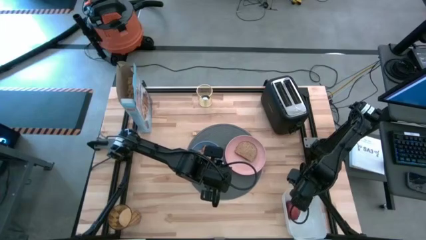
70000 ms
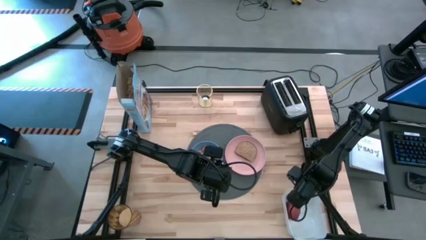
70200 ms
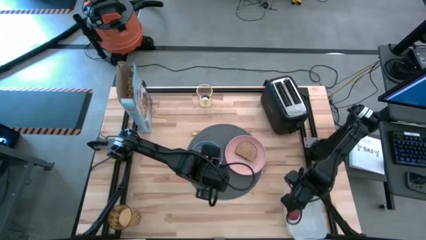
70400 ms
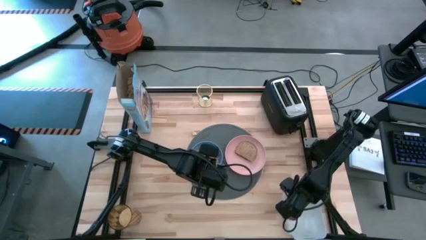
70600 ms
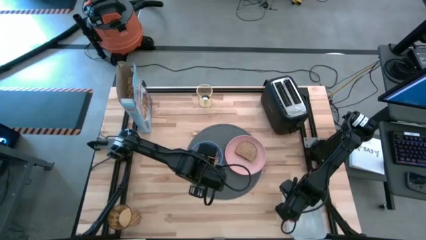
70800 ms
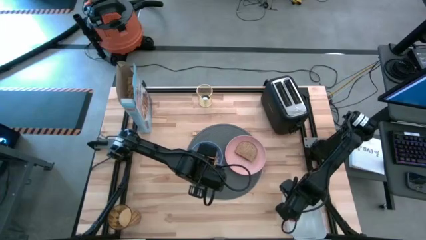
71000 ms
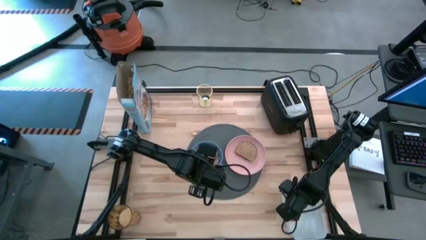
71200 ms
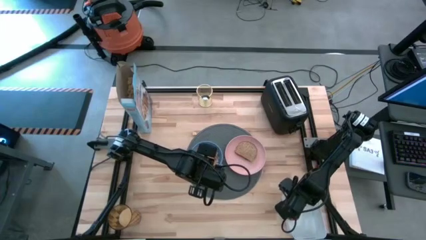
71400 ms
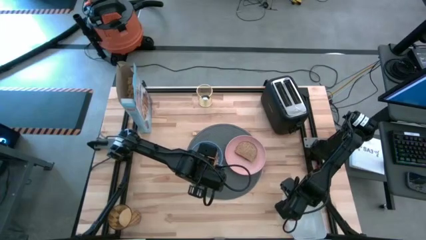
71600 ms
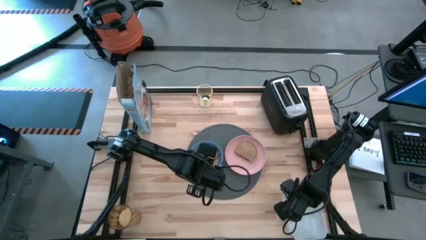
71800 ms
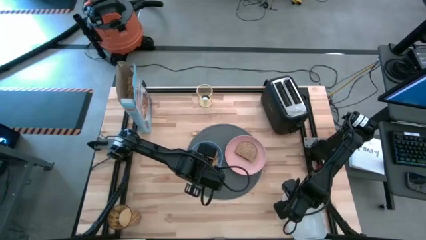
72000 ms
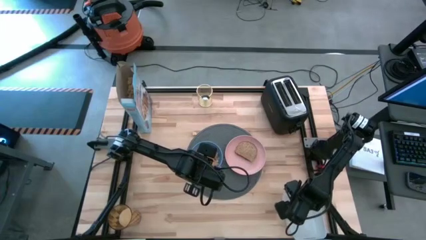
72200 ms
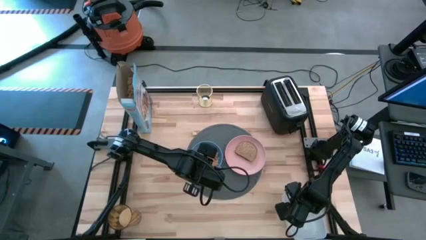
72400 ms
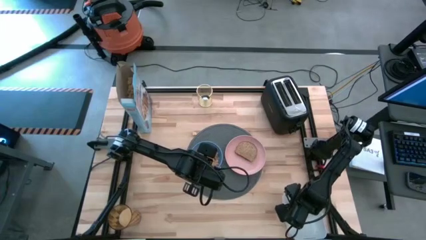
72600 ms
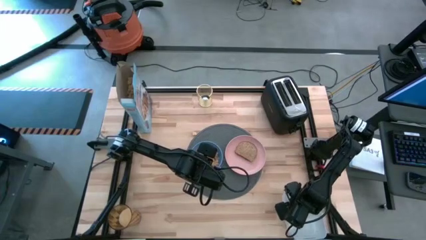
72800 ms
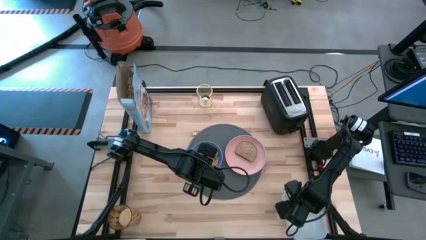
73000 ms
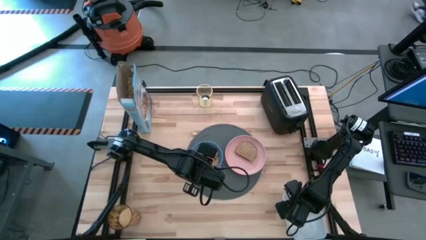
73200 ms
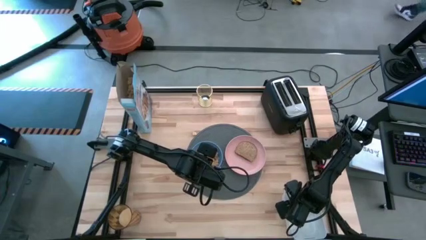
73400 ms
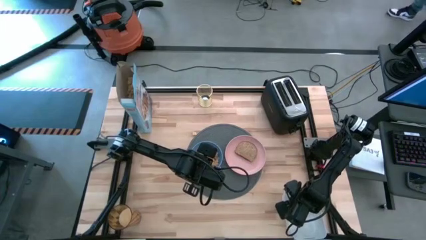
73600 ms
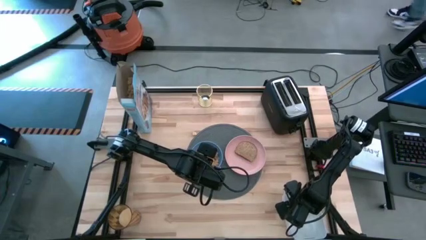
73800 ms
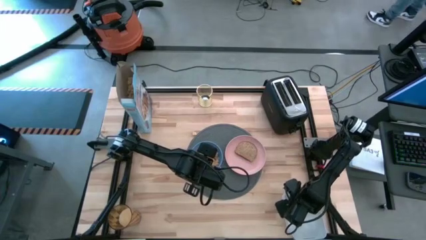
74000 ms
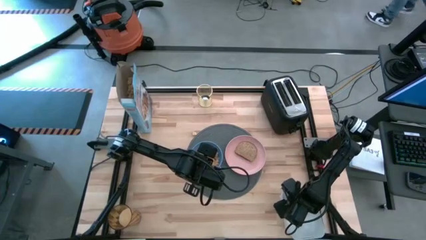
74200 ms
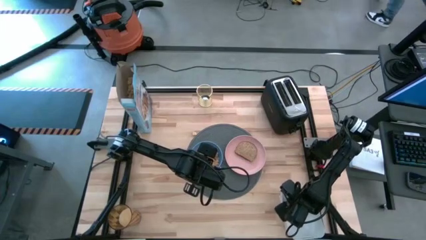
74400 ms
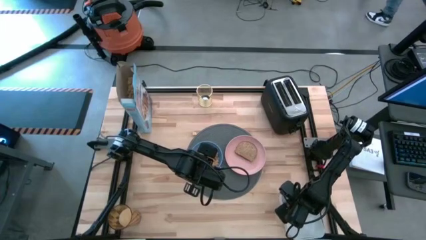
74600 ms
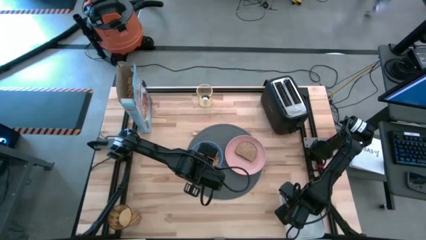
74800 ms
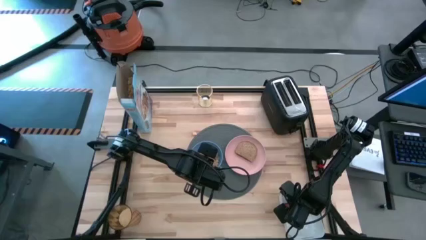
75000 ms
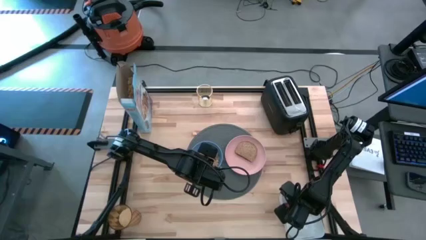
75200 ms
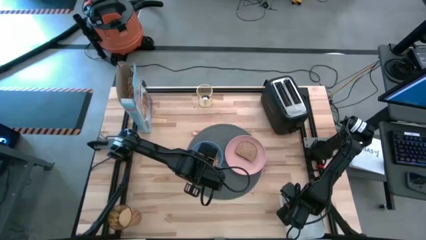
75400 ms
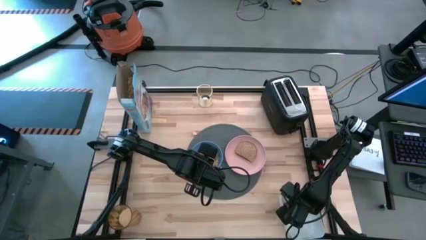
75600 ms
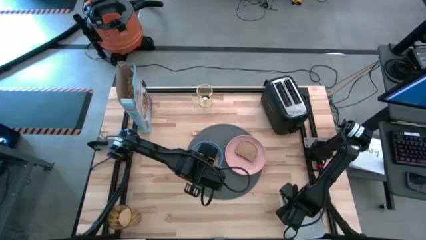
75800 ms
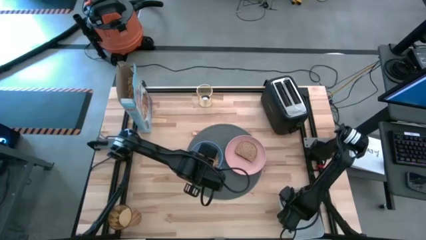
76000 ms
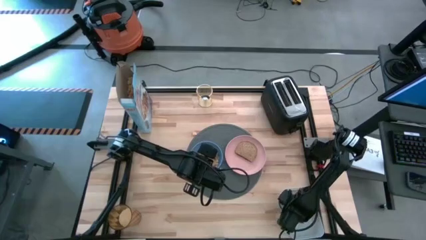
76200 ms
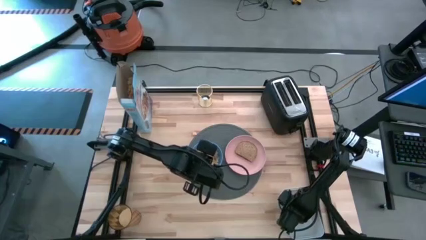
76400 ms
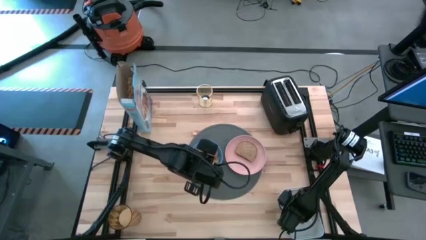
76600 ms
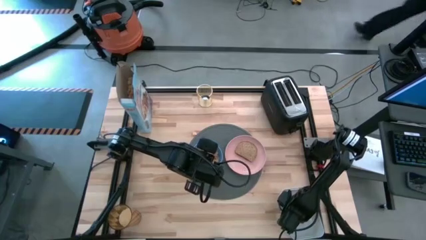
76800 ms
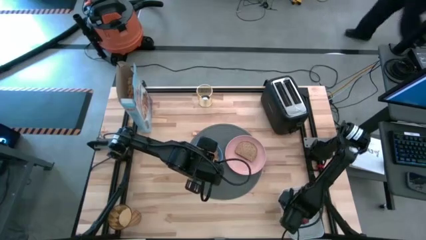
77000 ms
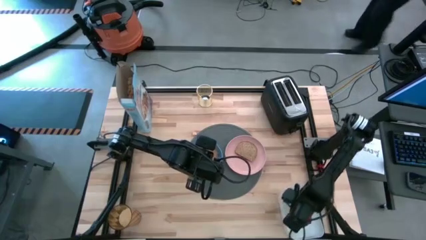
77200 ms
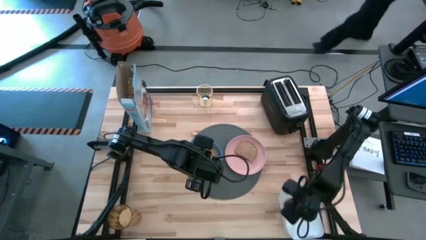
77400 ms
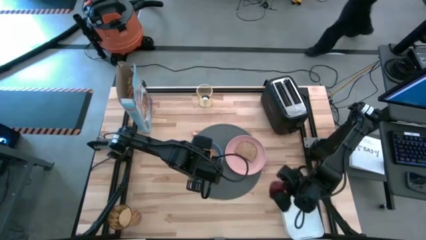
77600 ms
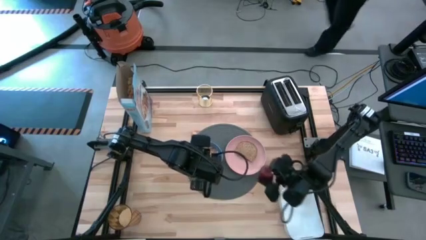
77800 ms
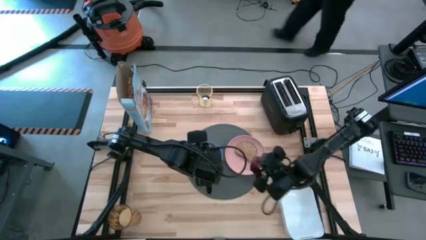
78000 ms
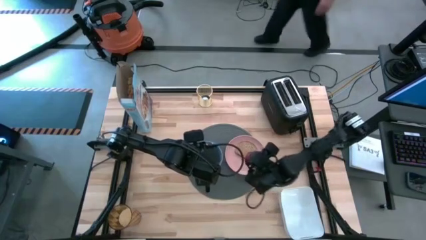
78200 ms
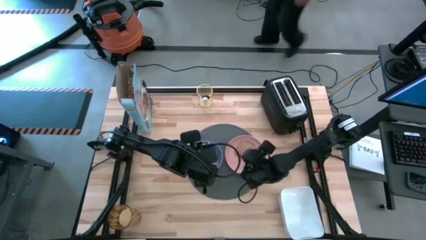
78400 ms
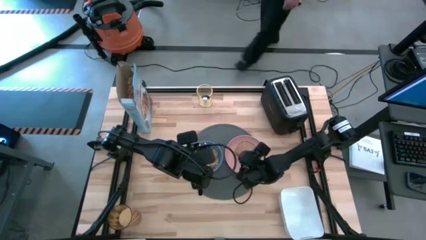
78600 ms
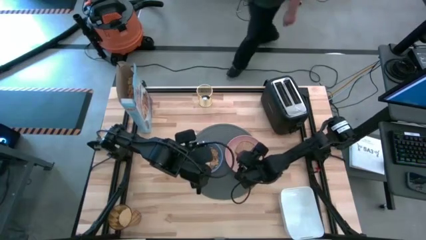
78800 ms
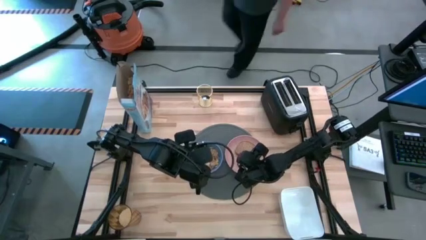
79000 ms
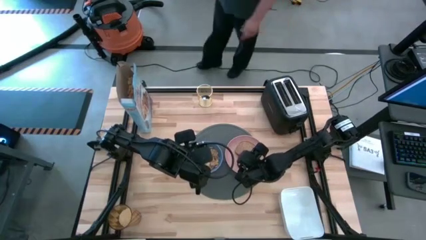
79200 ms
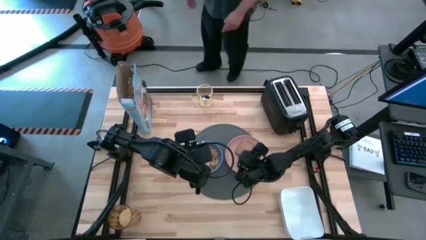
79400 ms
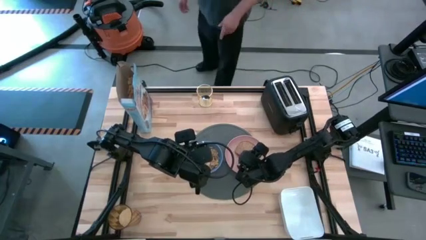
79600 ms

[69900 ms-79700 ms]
Task: Arrange a breakfast setting
Put the red apple on the pink plate on the gray mat
